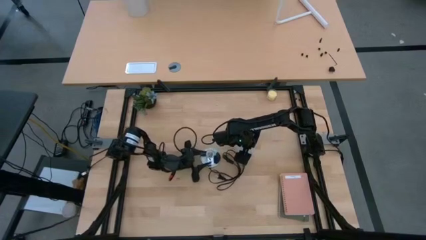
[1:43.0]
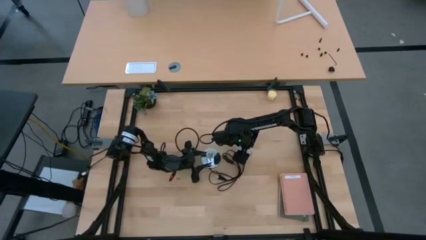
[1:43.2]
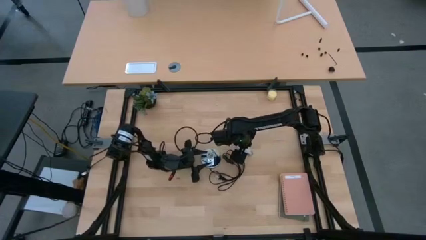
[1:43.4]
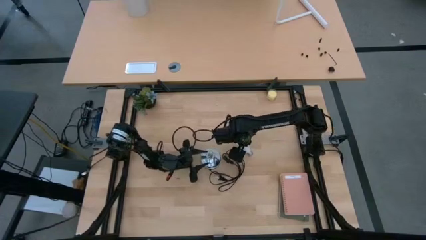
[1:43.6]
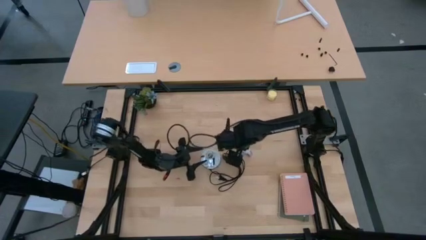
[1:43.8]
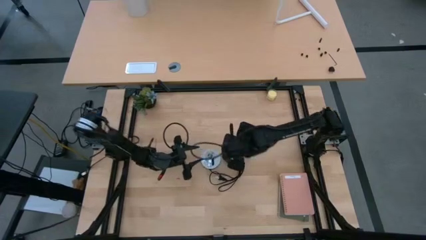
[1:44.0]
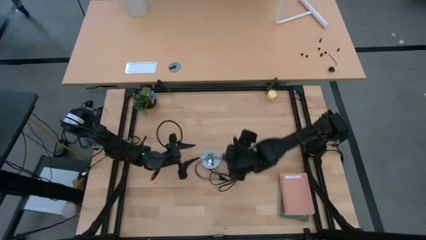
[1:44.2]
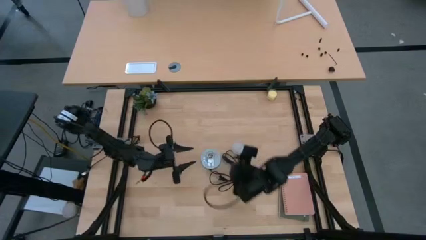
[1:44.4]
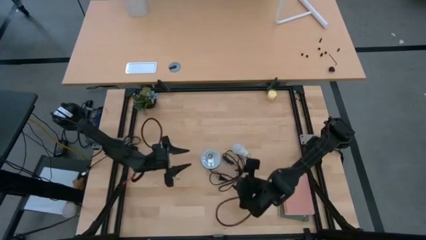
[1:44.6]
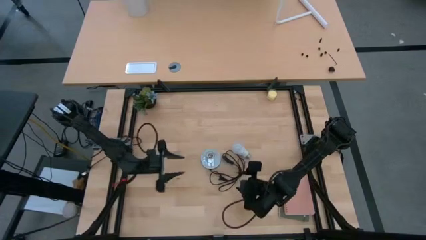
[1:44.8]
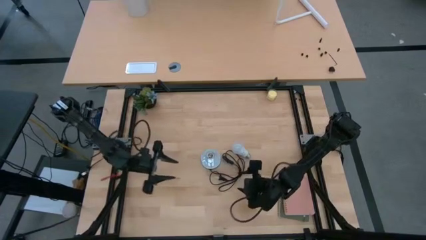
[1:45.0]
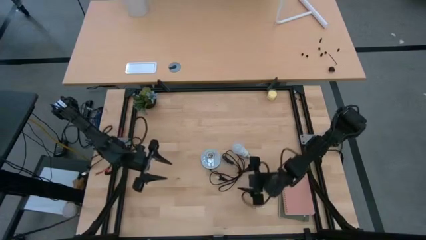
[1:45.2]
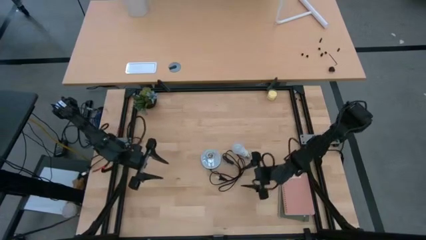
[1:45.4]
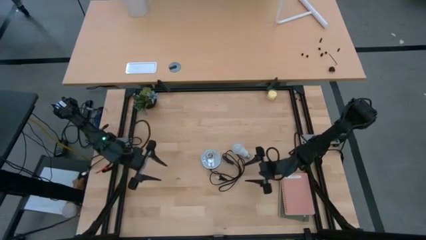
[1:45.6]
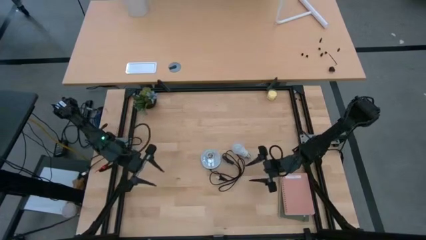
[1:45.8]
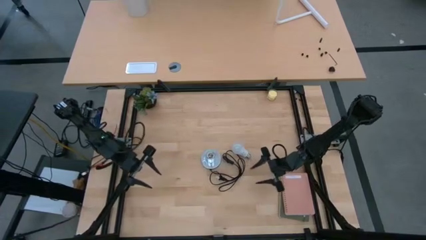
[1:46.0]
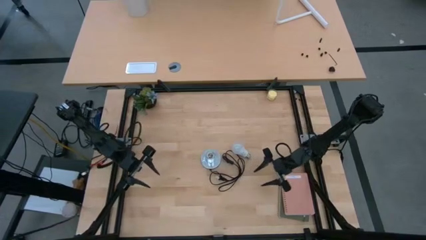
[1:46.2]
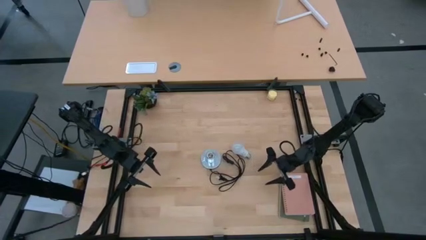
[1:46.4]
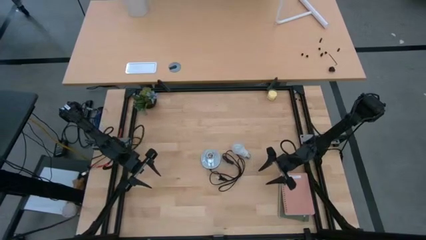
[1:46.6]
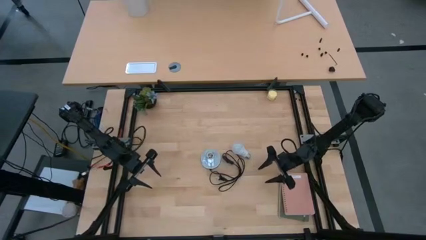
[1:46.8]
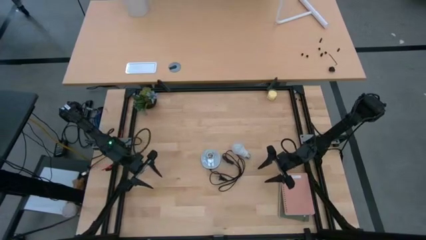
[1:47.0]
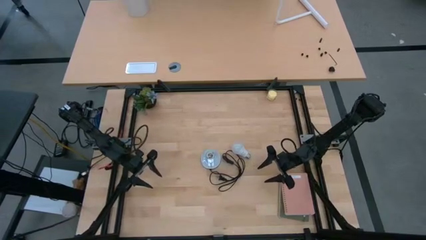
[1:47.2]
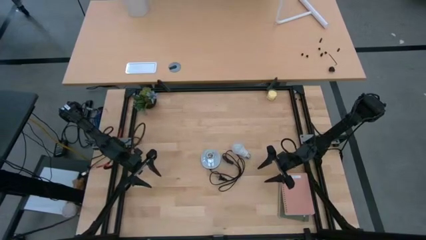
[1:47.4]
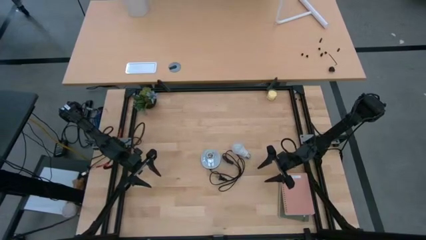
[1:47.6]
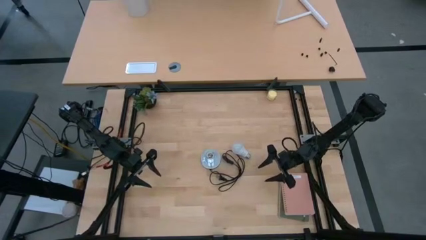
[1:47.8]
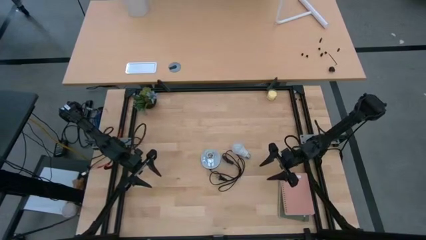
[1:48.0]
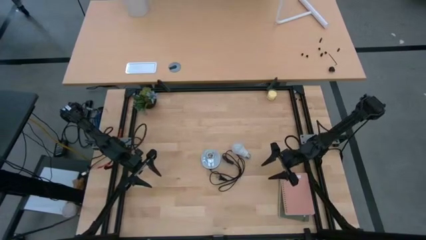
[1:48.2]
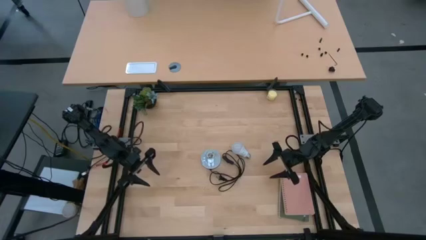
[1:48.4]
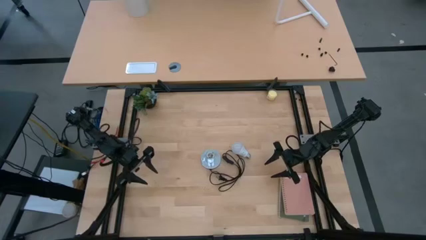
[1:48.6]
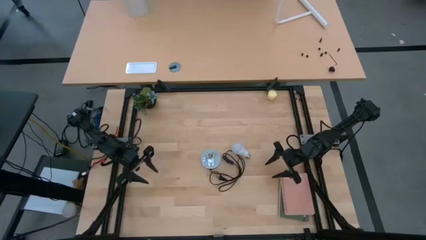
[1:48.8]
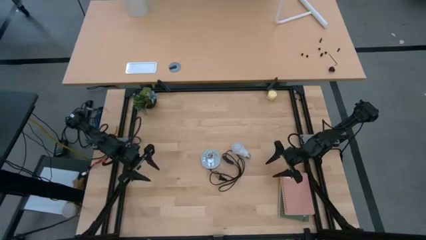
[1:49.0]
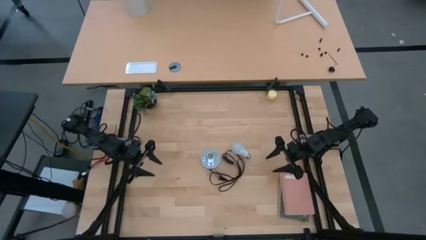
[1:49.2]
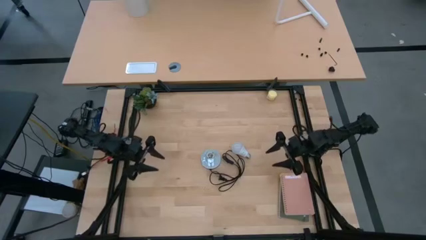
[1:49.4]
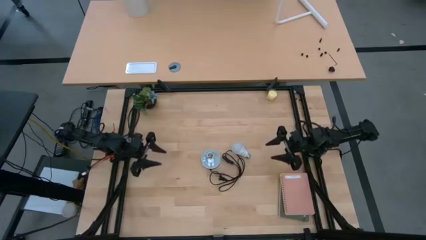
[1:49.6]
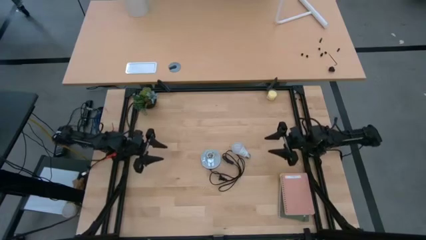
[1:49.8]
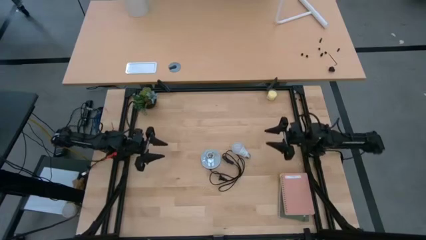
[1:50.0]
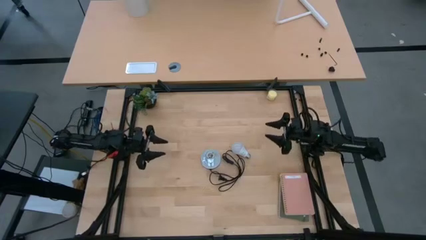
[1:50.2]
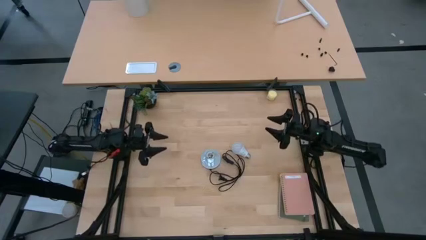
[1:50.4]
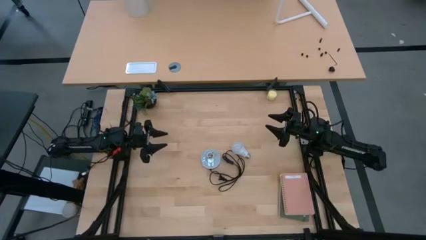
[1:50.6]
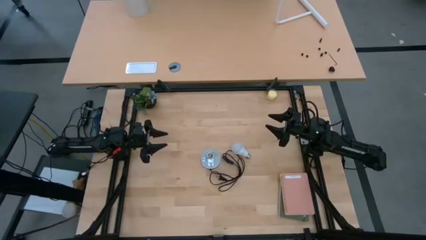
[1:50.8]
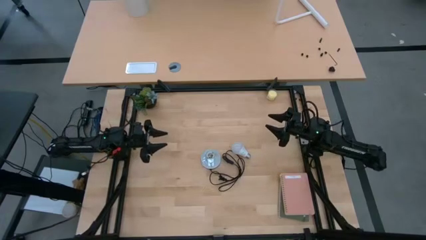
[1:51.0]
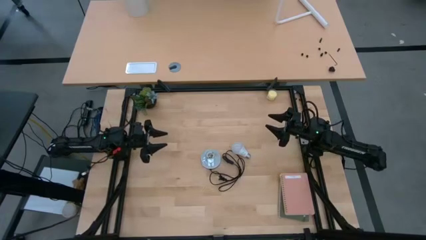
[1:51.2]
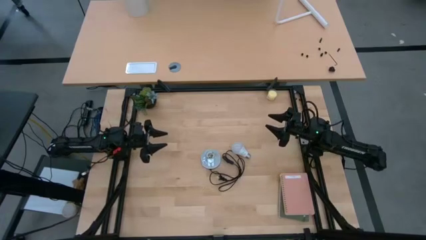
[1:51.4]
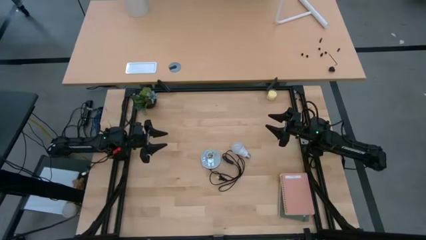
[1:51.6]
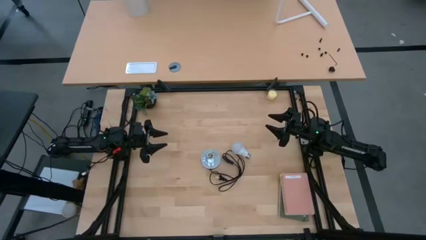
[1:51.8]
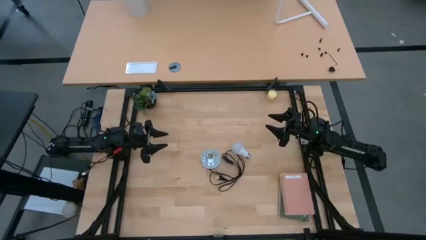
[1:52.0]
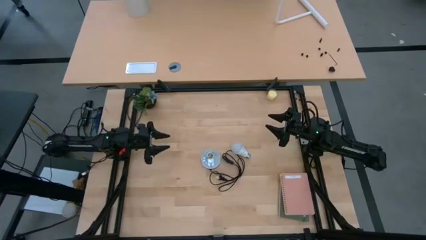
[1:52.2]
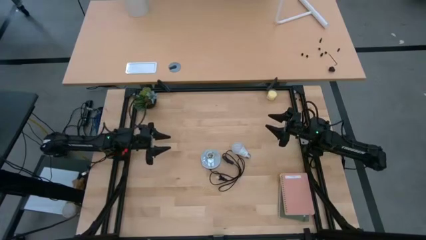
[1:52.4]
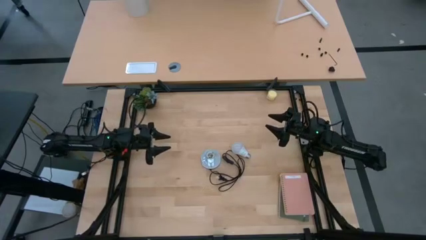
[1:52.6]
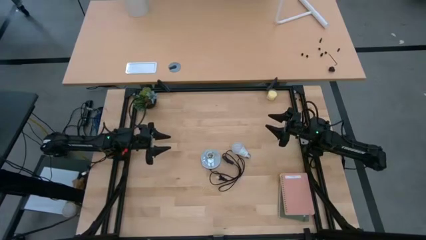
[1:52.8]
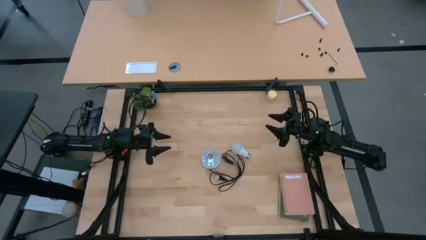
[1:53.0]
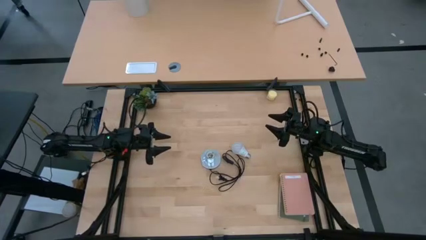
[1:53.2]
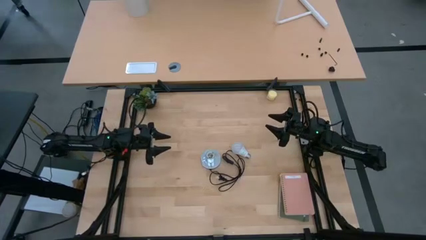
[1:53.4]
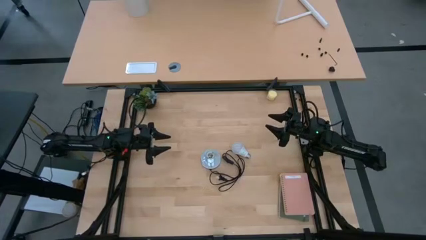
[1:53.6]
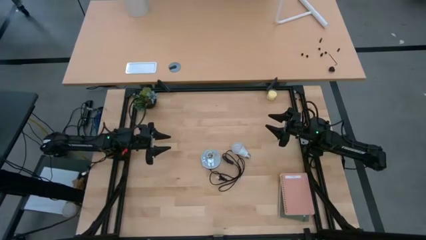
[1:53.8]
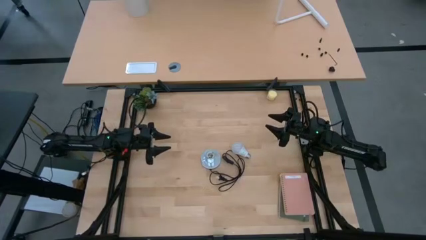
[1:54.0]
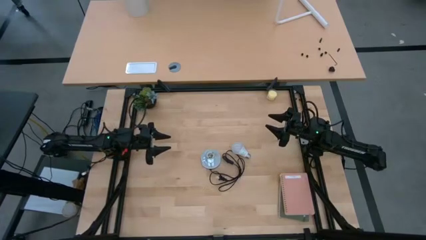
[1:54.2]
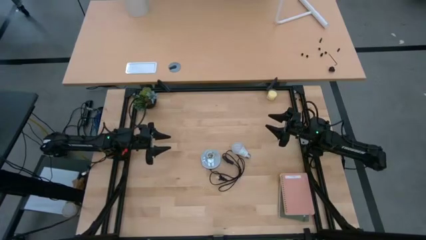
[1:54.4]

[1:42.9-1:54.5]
Task: Screw lightbulb
Return to Home Position

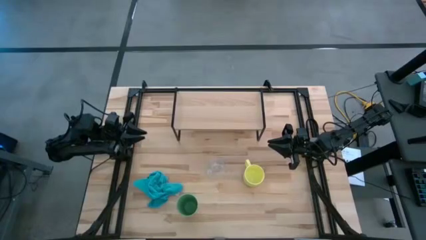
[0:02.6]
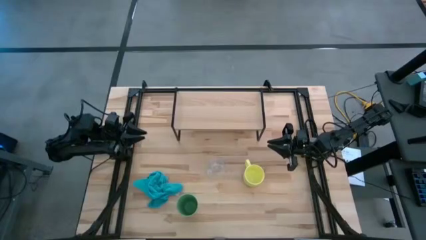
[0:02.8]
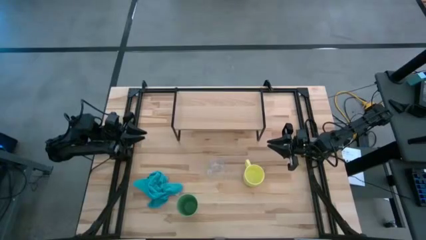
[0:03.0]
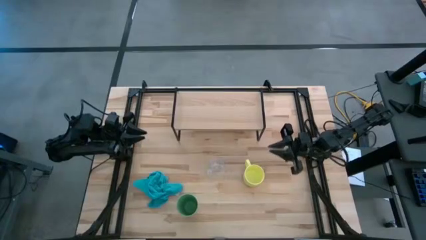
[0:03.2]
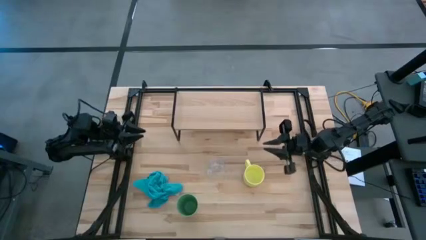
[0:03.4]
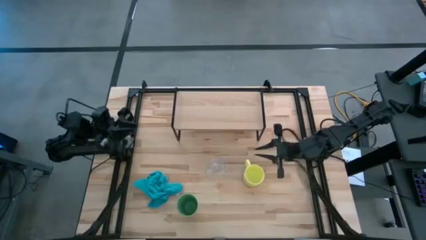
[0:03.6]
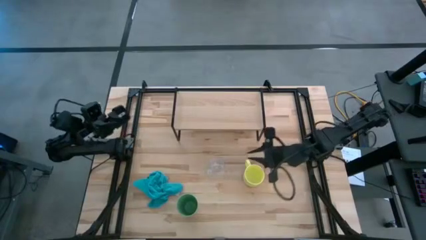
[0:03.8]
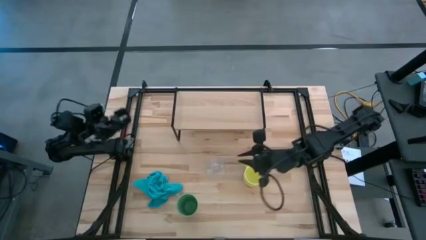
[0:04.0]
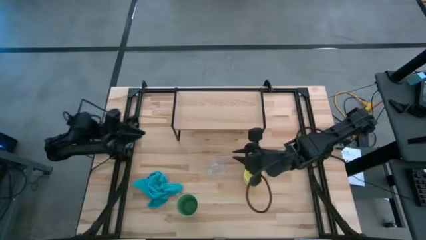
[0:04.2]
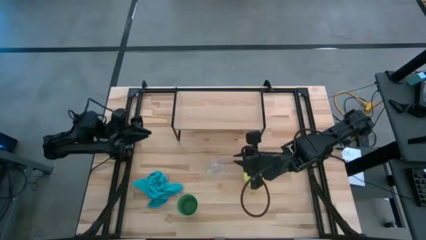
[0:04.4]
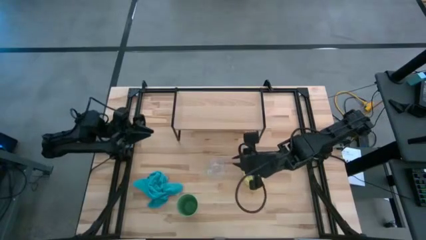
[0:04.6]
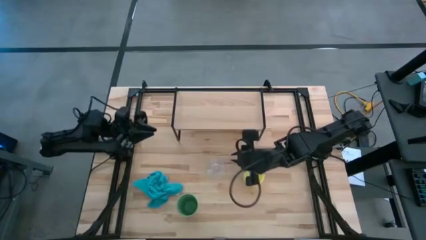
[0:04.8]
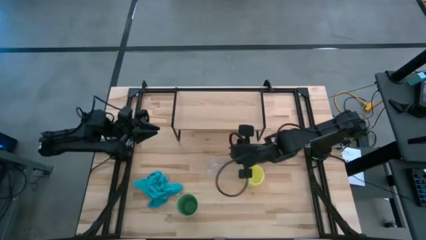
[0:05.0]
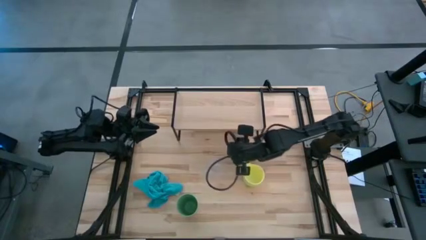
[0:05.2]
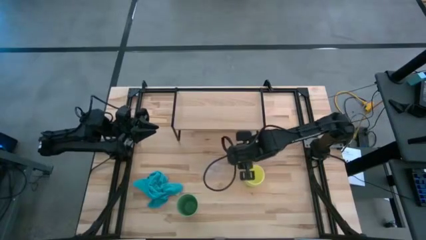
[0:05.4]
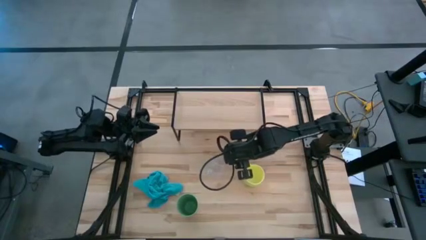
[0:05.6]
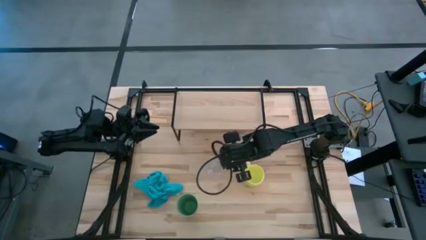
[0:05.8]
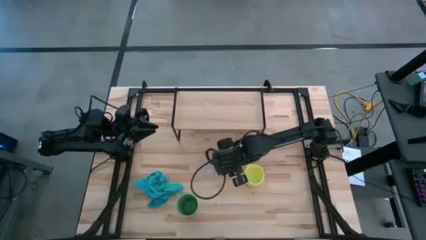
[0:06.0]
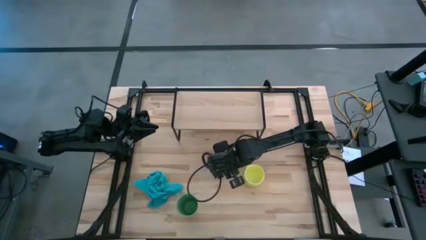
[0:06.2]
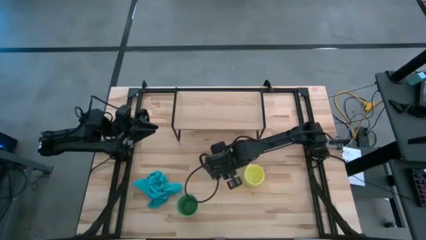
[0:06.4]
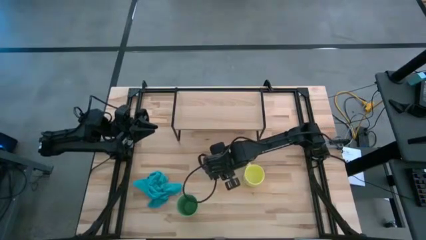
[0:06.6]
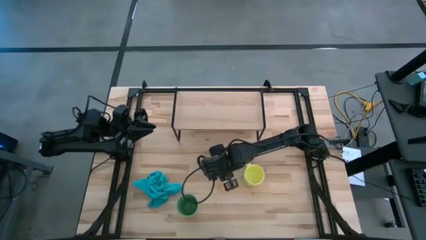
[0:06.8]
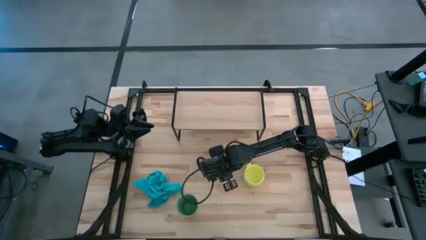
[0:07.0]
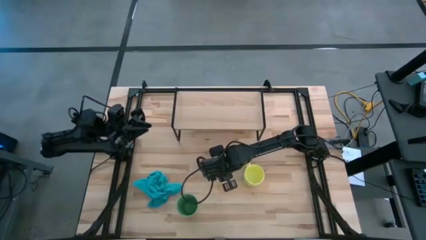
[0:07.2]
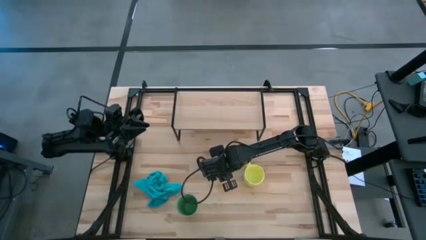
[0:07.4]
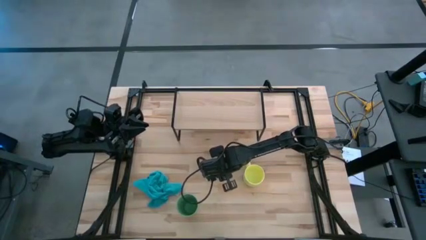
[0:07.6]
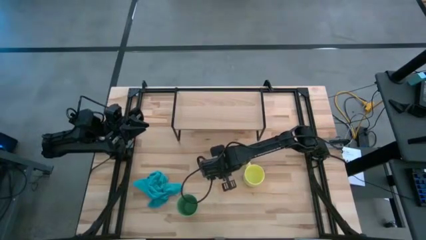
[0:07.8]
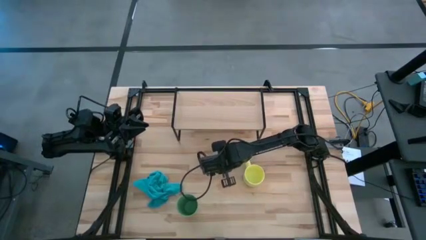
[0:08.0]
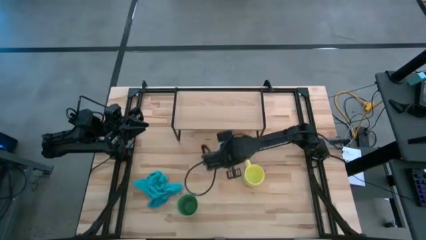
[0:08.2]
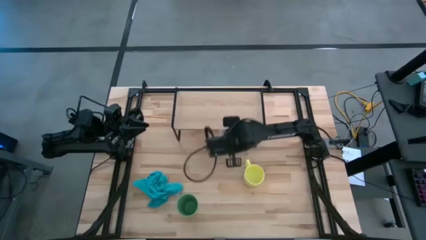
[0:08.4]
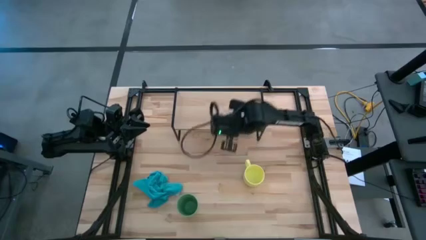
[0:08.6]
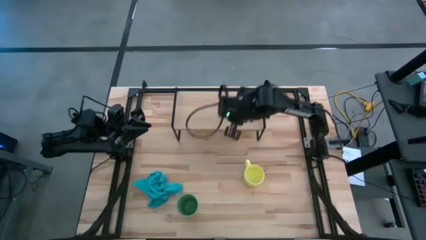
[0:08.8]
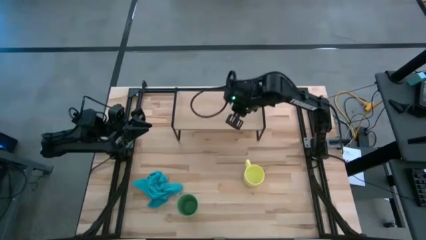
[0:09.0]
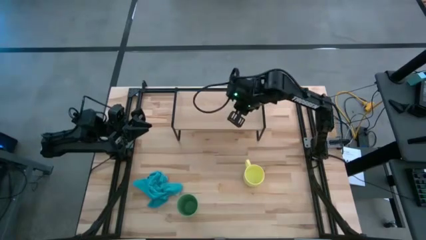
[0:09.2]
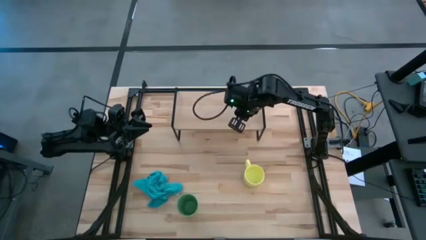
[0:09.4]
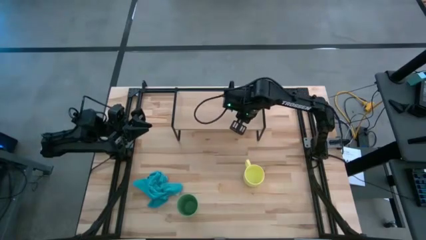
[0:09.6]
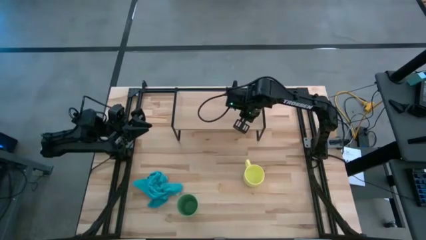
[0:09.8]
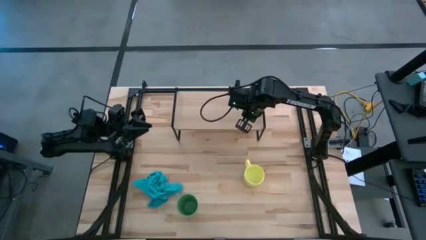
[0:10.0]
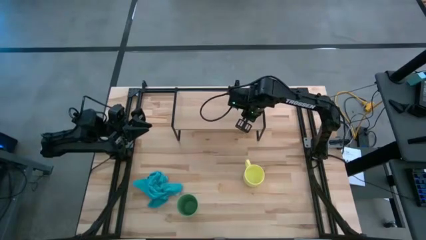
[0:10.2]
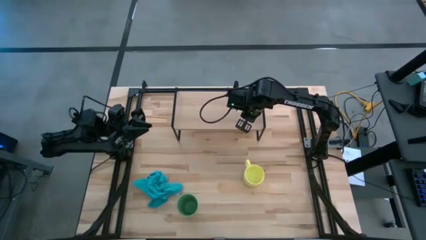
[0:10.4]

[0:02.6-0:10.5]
Task: Stack small to large cups/mugs on shelf
Put the transparent cup on the shelf
